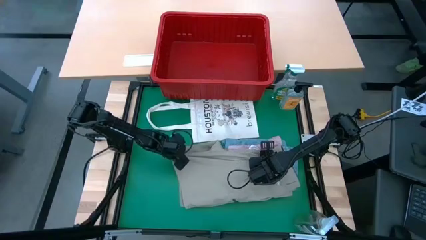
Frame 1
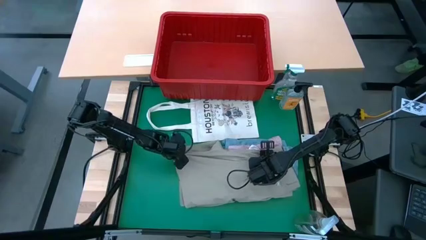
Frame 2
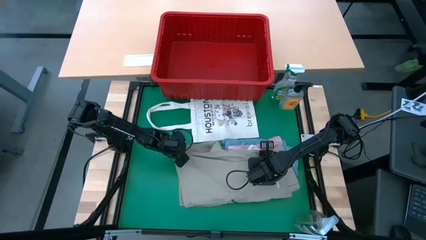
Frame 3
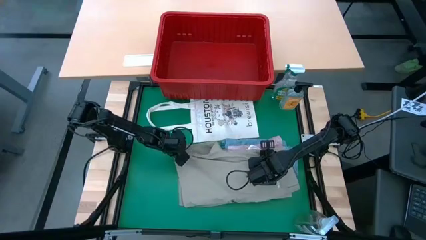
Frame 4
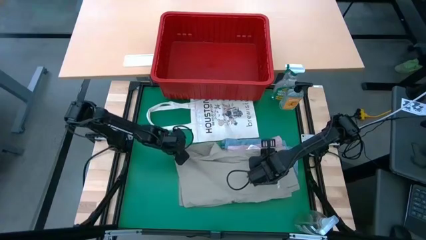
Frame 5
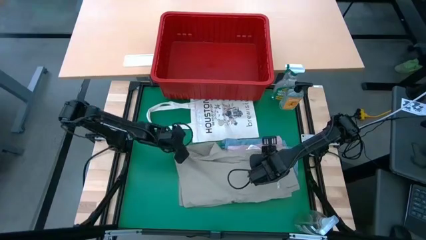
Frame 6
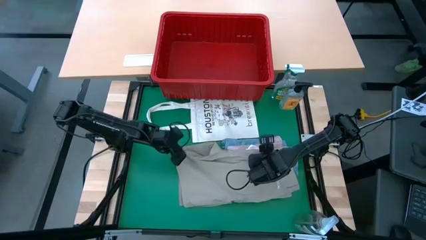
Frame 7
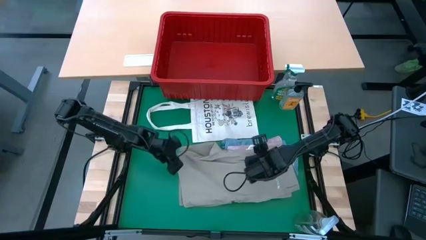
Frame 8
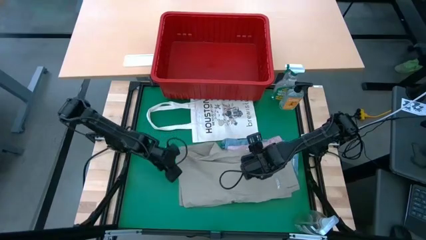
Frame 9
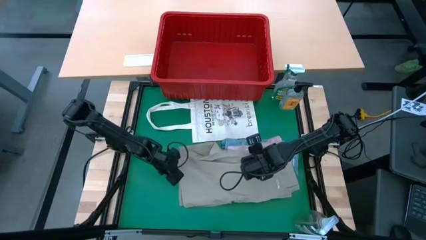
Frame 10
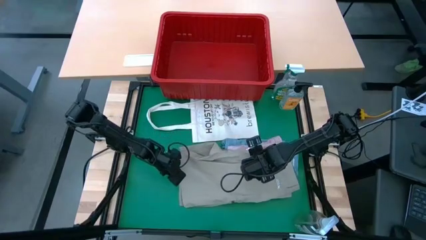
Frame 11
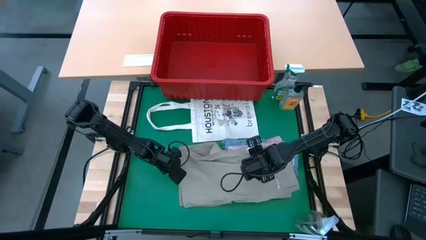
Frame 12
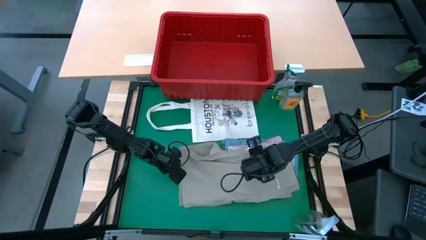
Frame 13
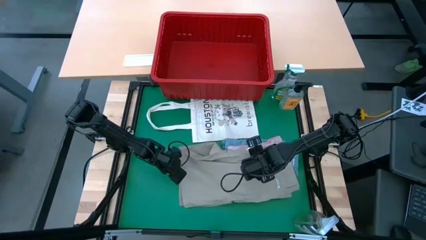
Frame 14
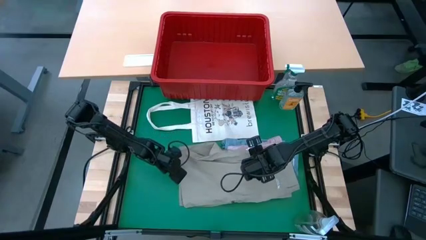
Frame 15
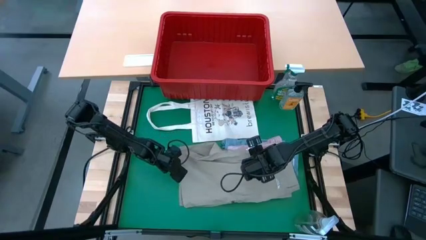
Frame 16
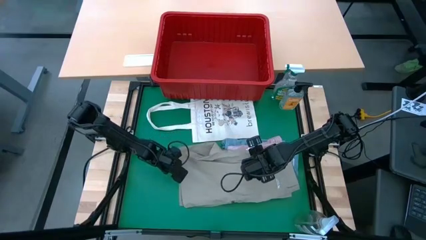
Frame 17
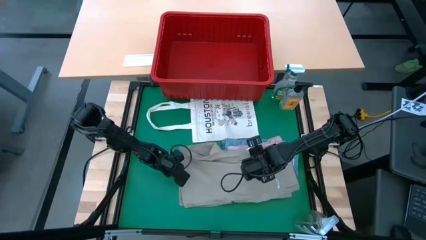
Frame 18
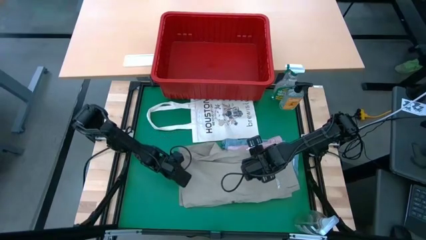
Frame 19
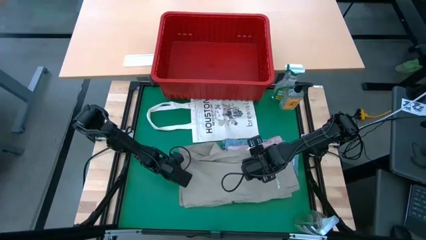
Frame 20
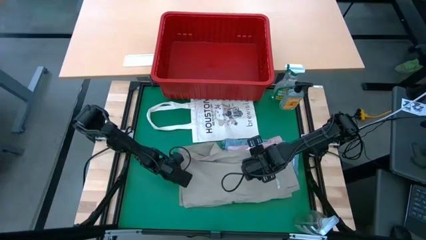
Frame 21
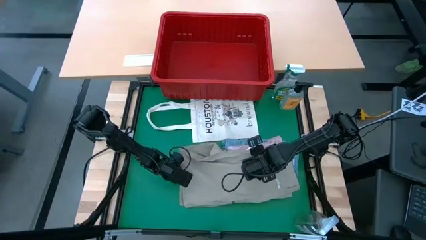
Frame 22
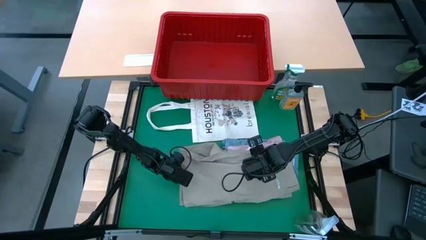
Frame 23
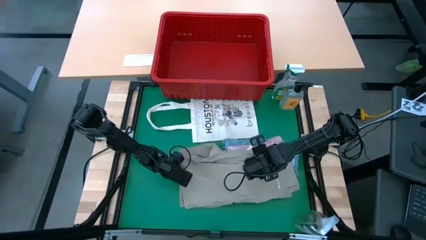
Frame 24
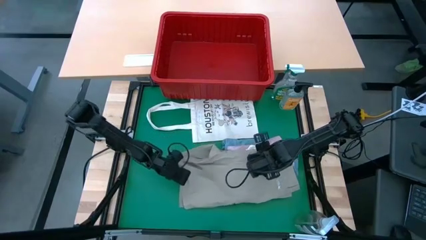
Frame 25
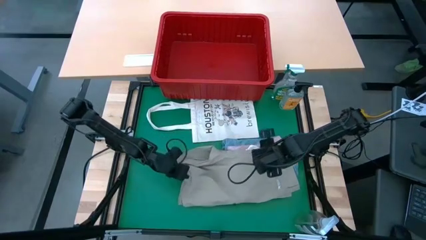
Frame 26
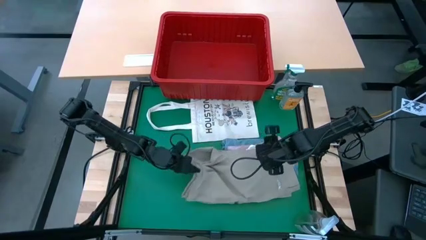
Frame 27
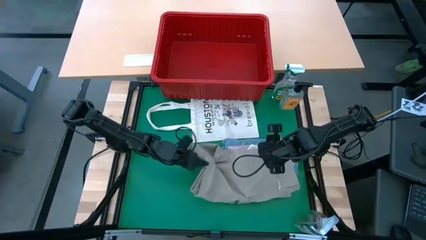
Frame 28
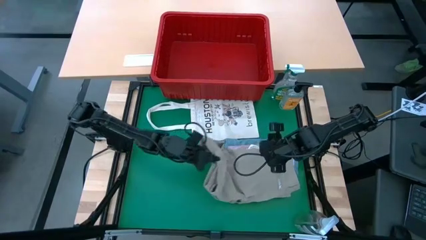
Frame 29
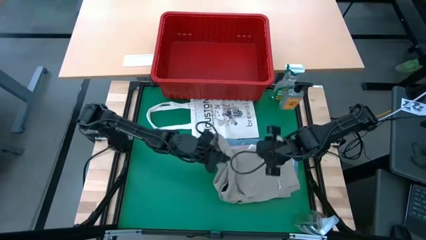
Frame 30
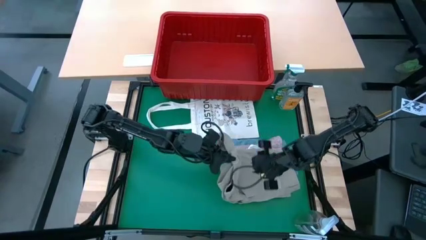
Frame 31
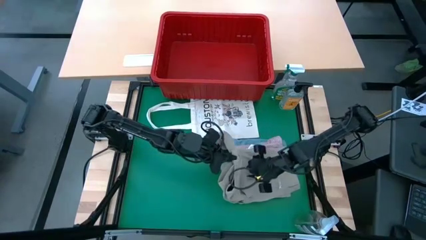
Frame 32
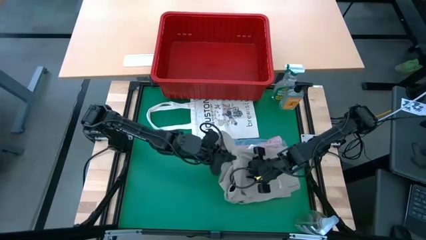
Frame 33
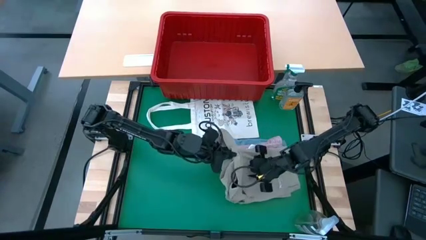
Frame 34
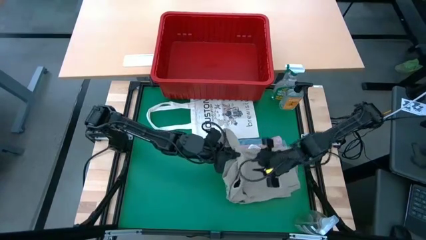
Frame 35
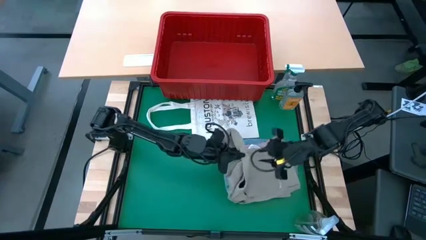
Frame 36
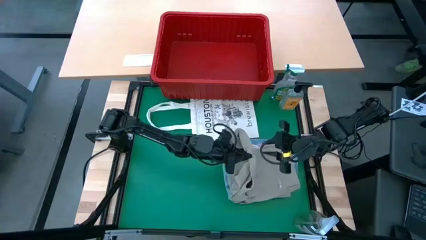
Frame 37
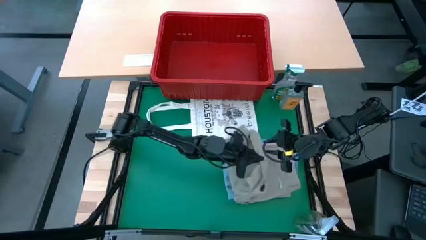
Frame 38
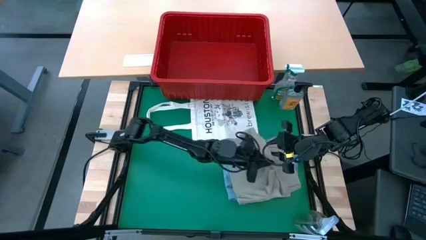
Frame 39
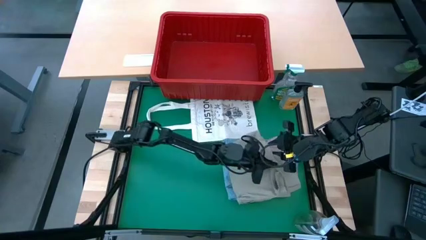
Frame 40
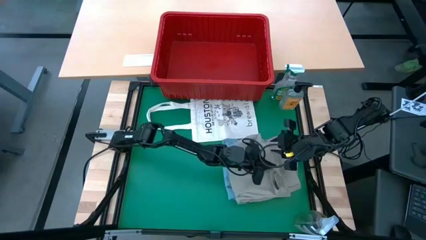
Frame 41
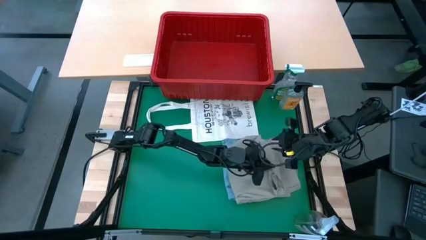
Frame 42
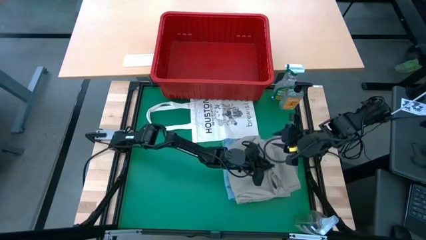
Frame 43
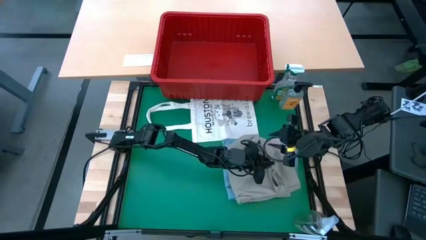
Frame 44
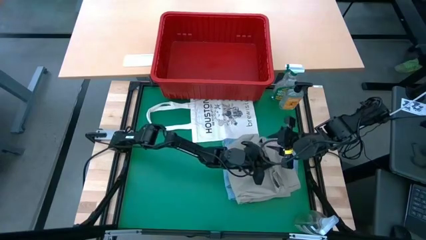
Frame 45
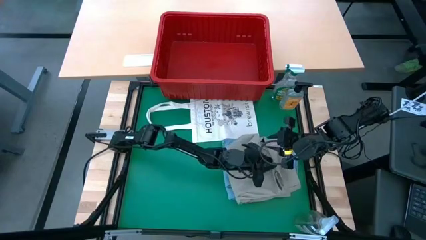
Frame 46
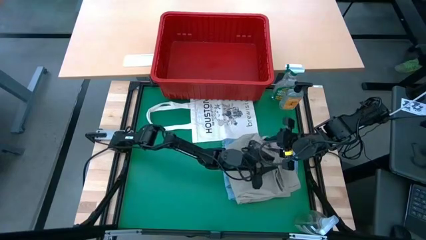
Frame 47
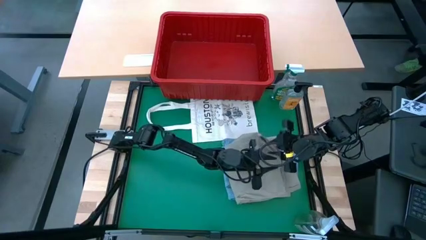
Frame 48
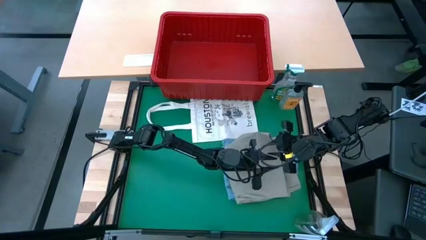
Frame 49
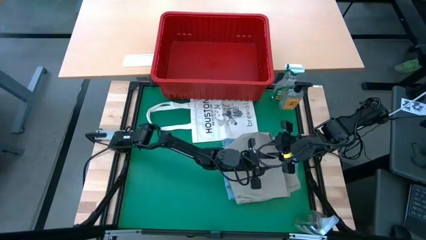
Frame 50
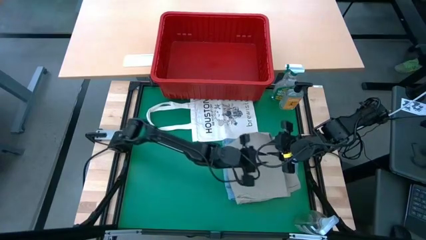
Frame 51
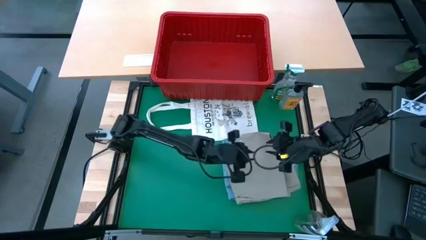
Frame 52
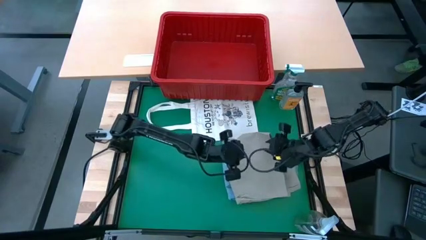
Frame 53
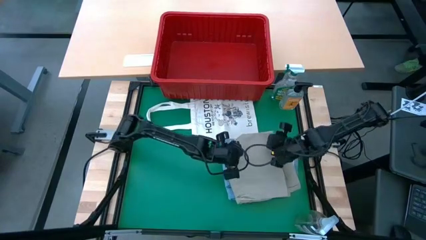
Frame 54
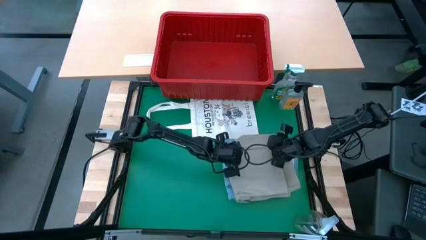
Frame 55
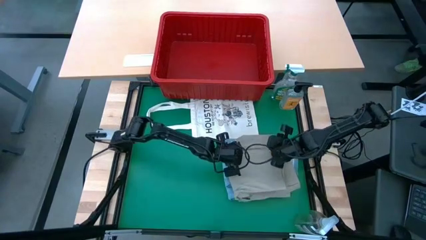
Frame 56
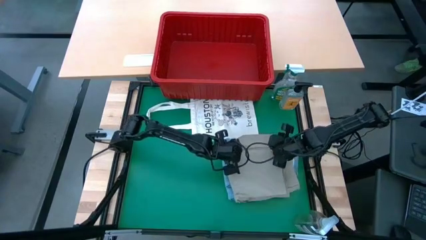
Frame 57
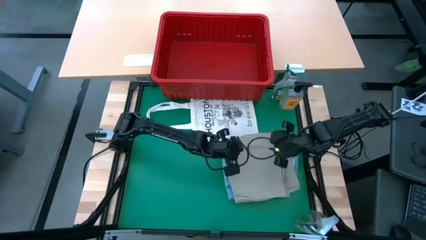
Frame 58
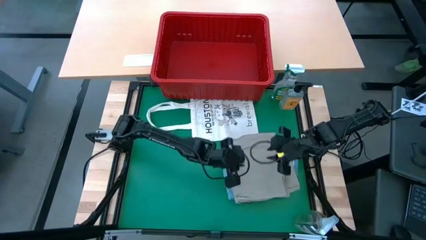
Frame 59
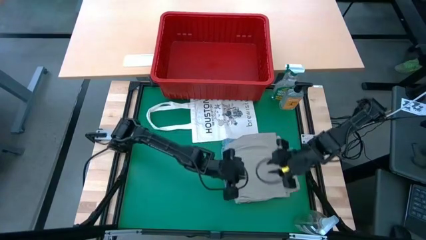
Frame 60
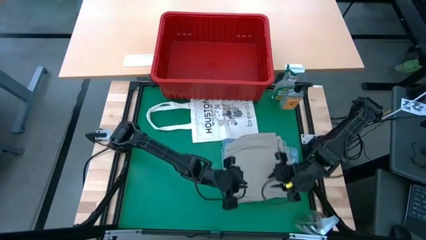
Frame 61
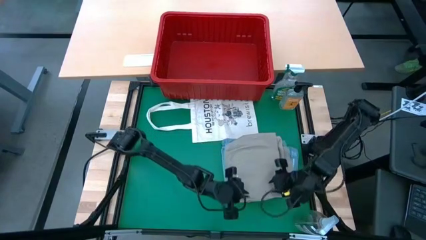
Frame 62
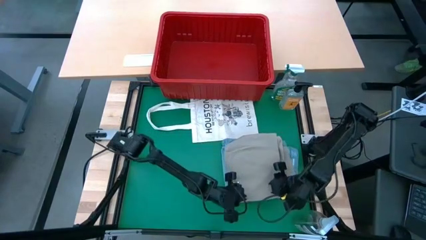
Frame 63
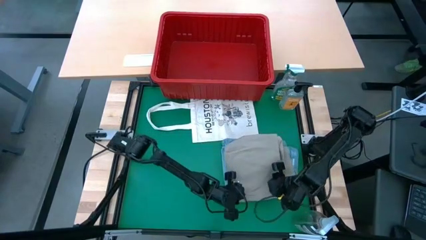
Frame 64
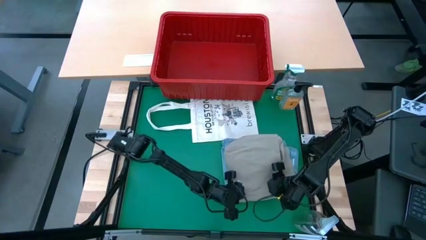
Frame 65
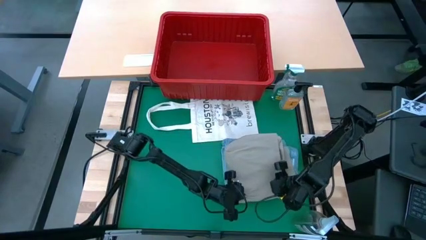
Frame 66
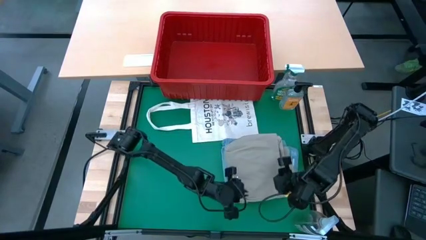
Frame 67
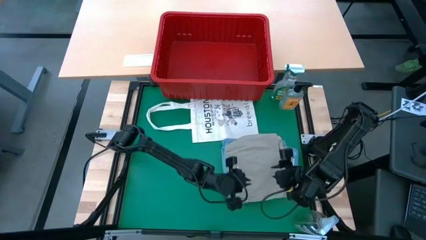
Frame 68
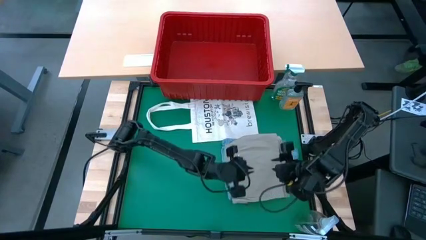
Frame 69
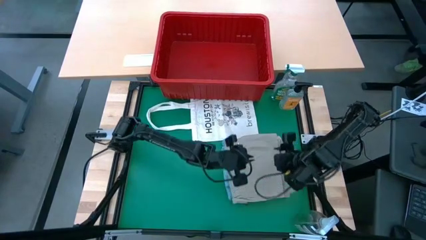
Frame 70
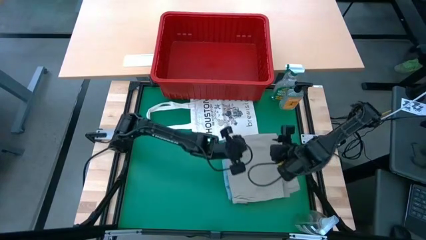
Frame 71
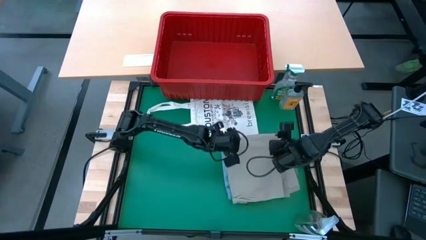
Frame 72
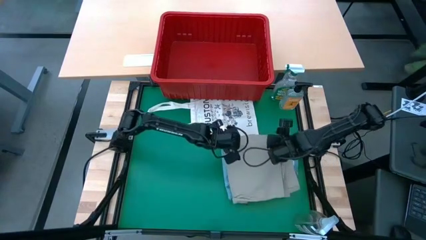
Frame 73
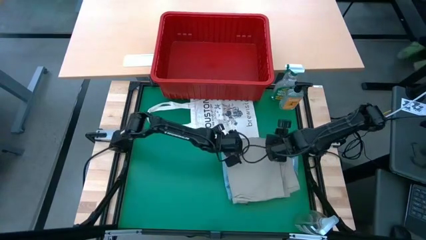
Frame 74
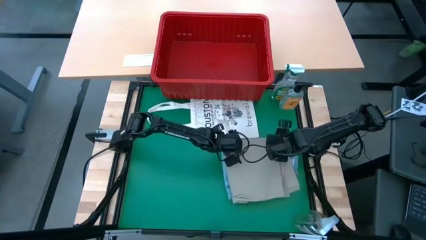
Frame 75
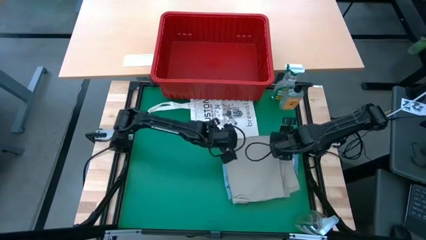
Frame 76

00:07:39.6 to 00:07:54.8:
Task: Fold Laundry from Bin
Fold the light brown shorts from the red laundry basket
